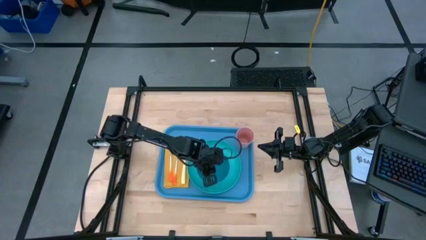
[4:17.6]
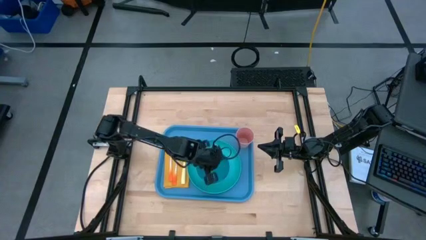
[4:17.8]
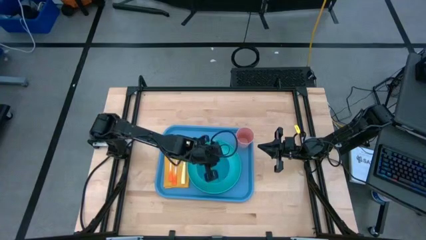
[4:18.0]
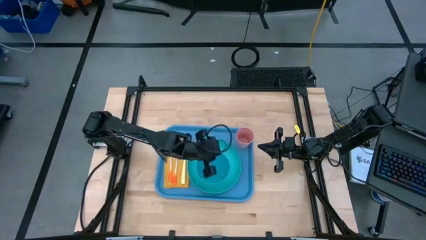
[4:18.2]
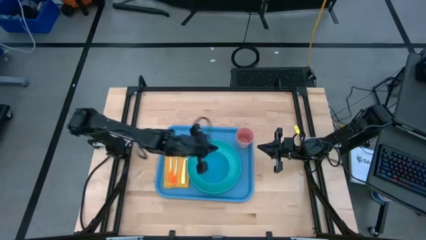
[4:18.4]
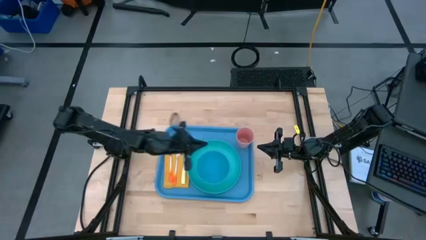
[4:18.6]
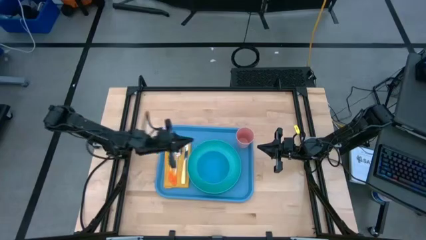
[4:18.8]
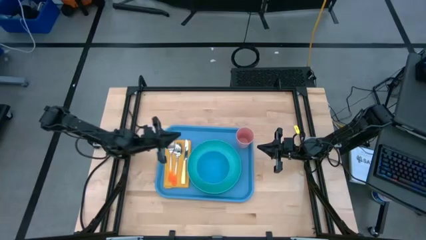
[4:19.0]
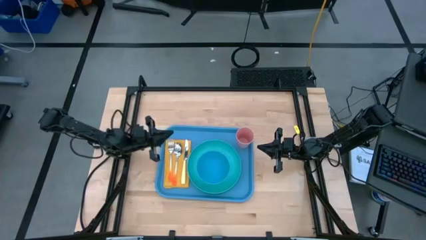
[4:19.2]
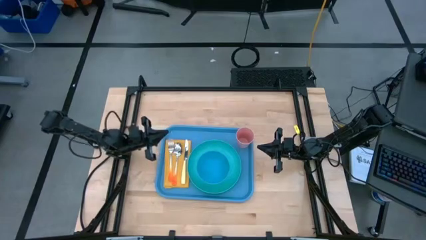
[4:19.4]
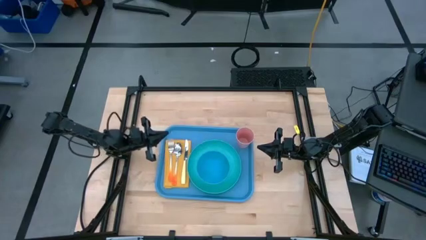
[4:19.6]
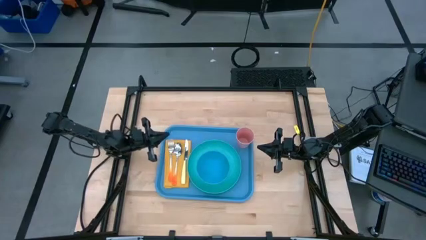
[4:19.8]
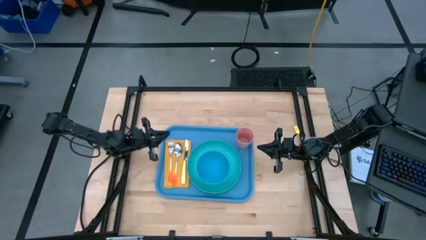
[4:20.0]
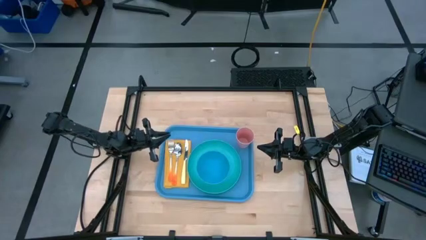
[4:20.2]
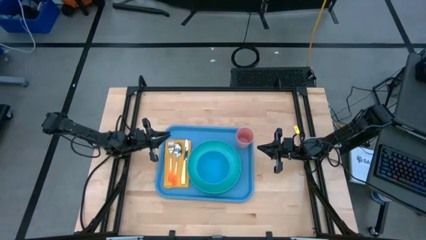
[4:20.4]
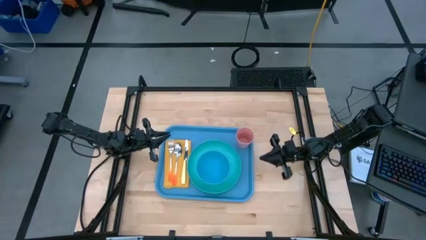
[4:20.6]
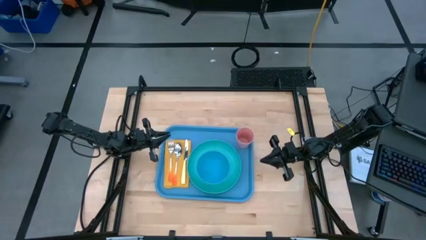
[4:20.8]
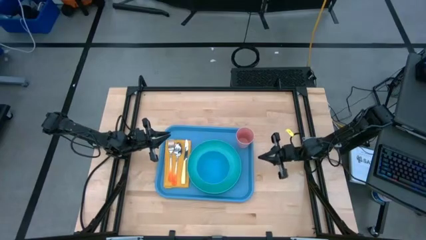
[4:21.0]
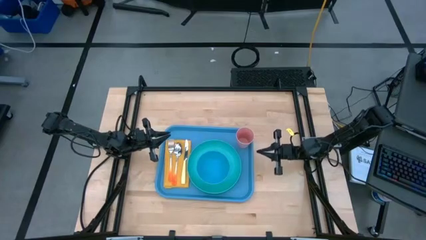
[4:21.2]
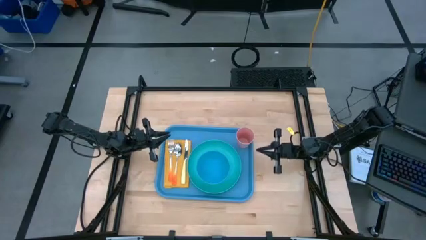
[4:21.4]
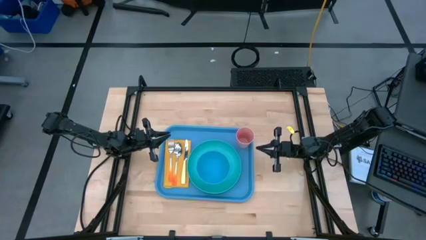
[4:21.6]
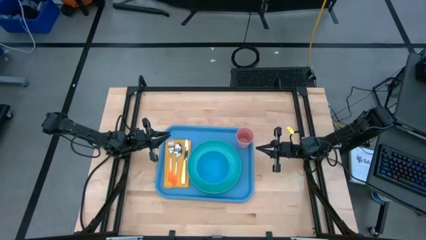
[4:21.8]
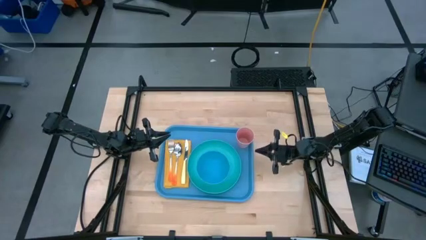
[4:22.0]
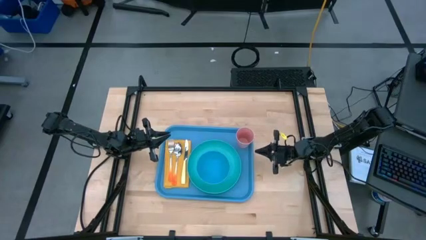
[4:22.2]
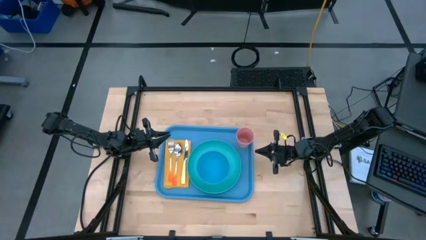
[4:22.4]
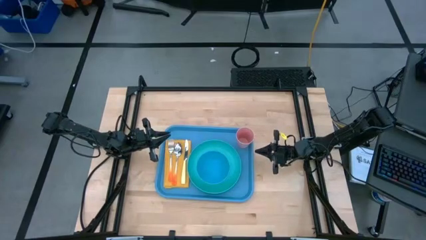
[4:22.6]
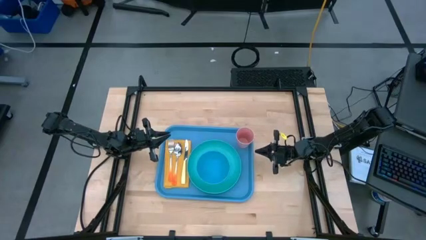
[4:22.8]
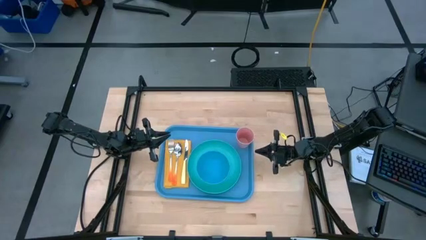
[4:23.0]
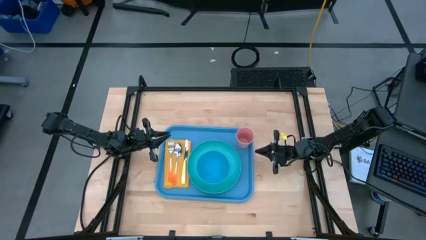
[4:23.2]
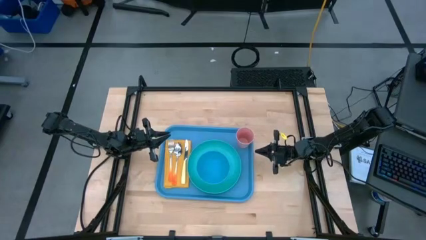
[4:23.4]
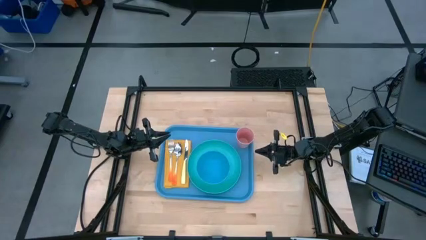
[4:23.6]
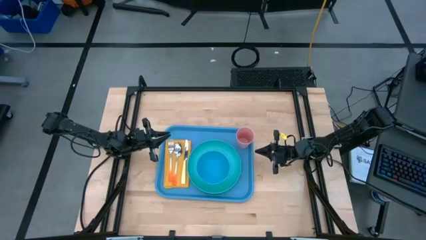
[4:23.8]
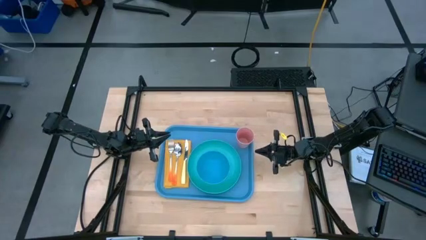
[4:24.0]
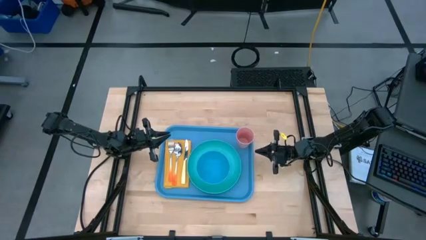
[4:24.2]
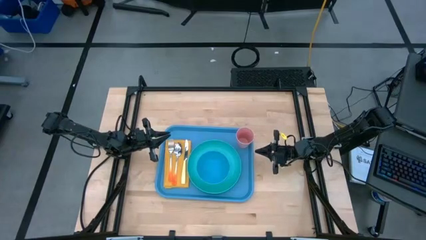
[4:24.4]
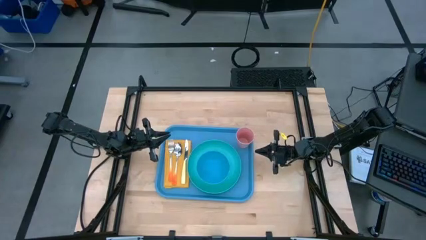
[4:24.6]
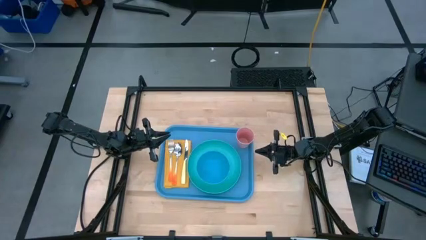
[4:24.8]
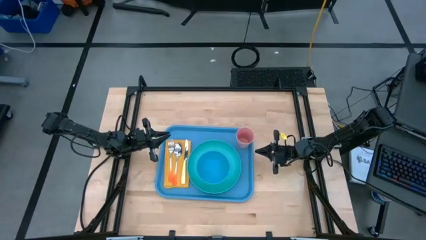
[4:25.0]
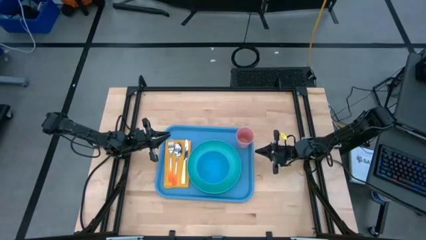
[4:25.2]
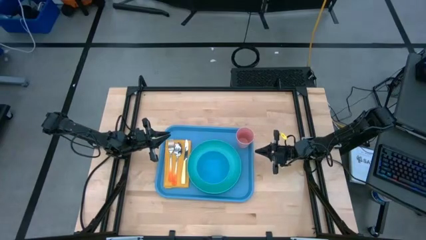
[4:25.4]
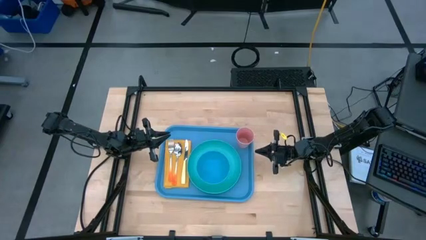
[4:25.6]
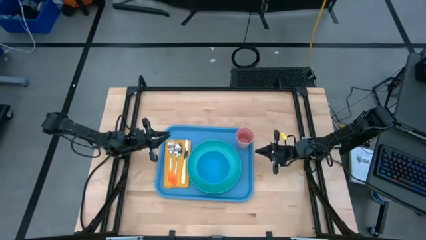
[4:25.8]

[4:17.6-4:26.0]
Task: Set up tray
Return to Home Position
